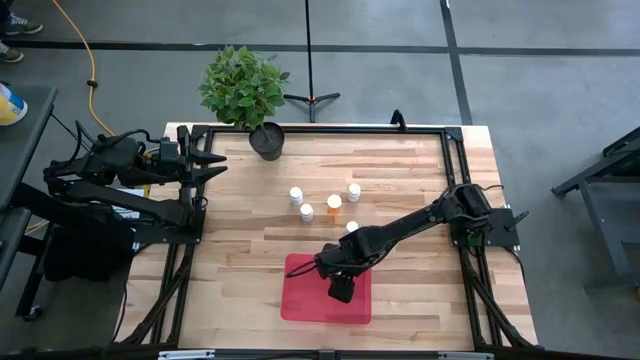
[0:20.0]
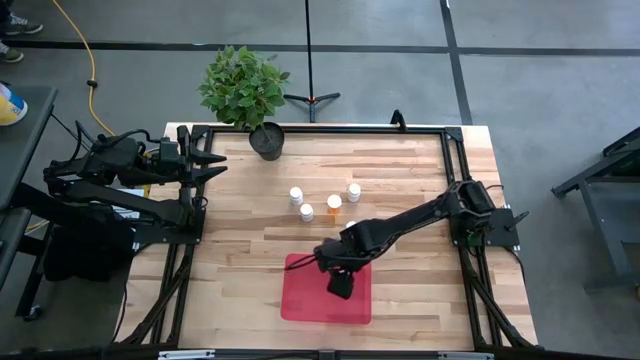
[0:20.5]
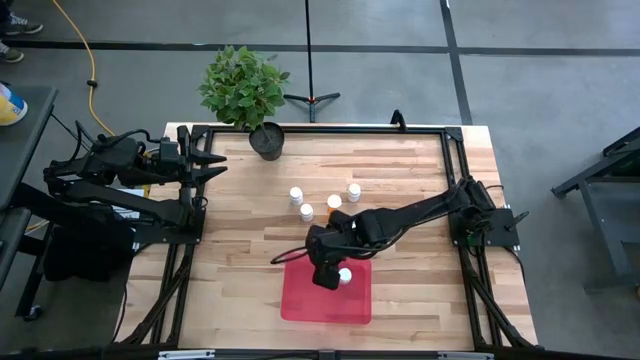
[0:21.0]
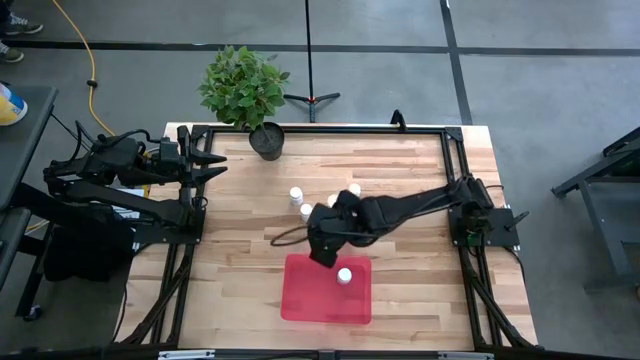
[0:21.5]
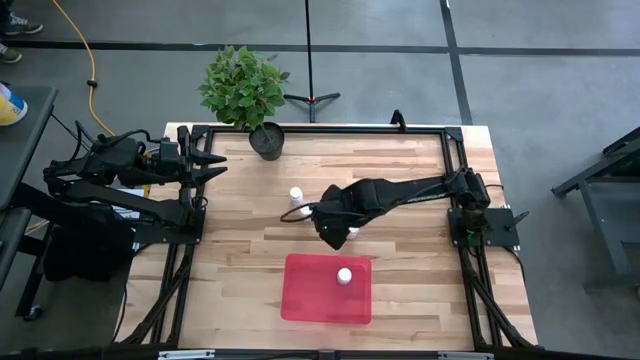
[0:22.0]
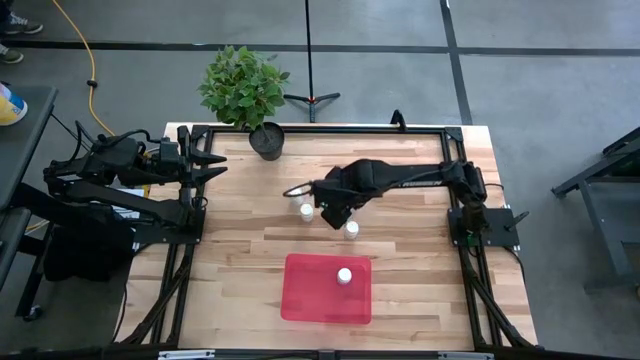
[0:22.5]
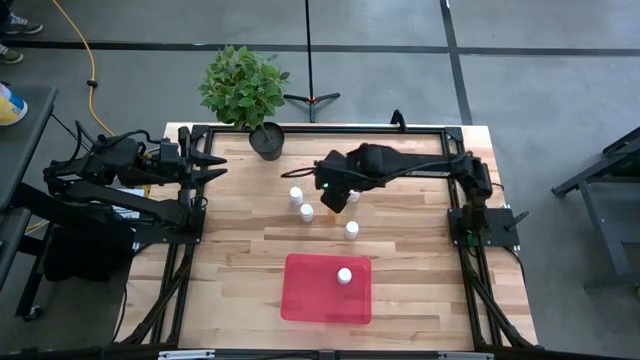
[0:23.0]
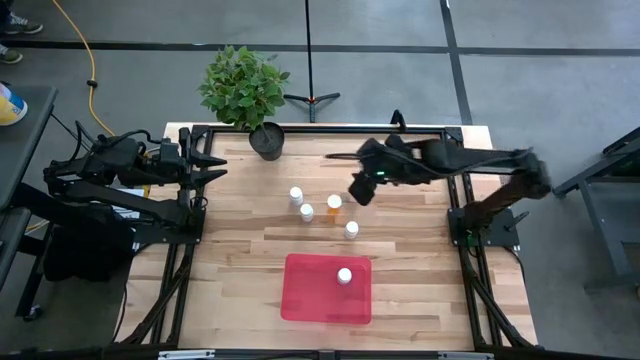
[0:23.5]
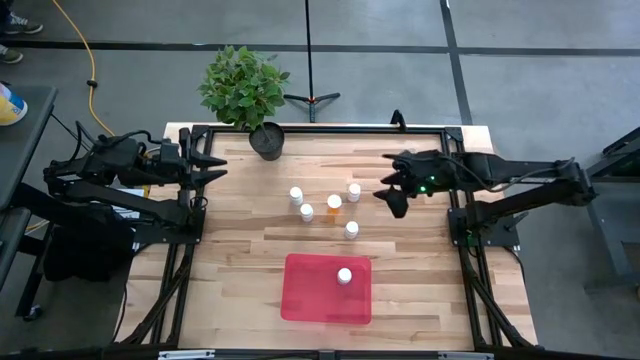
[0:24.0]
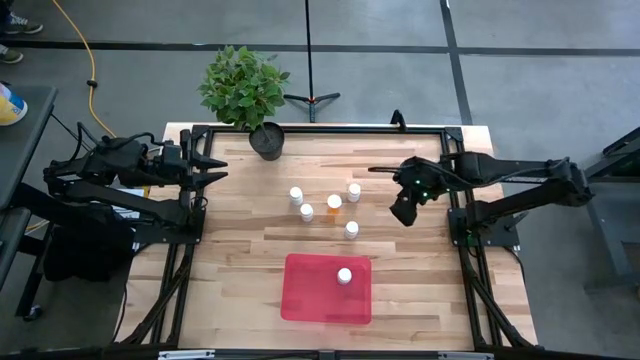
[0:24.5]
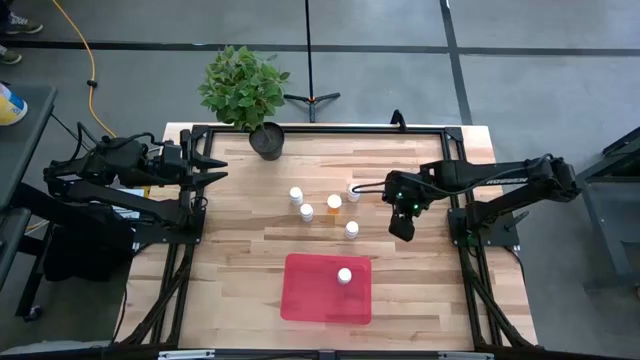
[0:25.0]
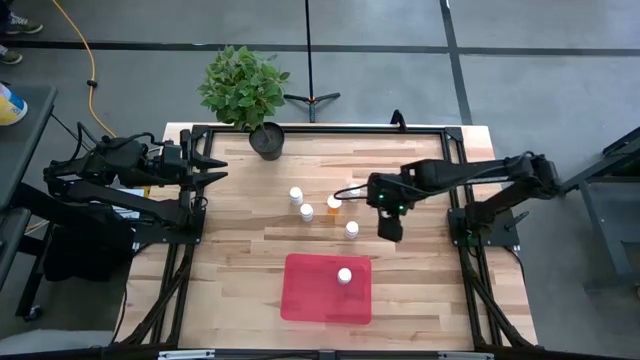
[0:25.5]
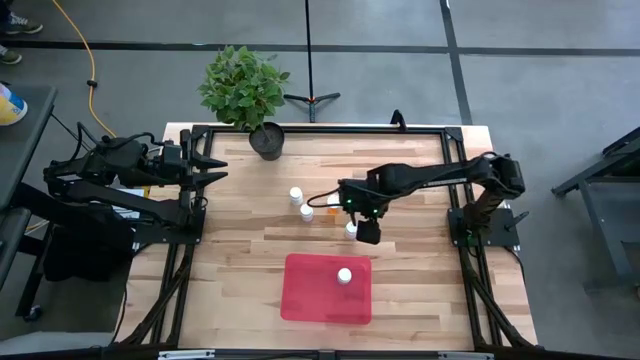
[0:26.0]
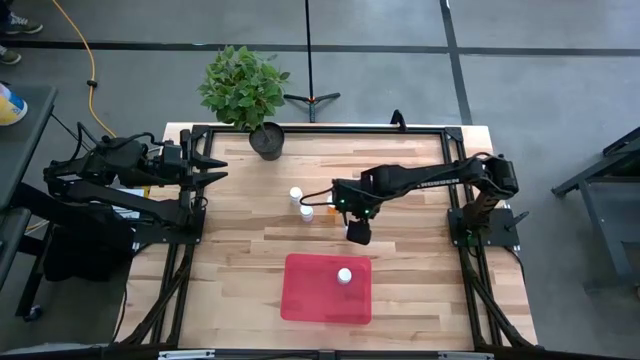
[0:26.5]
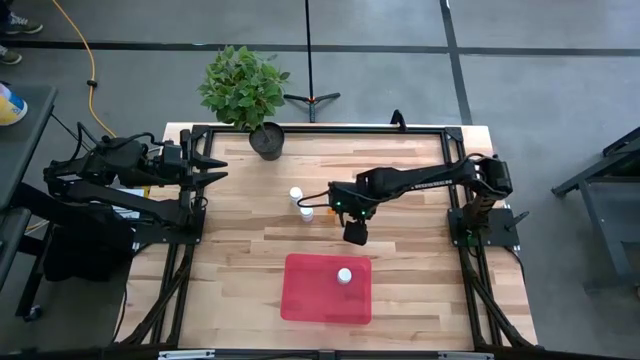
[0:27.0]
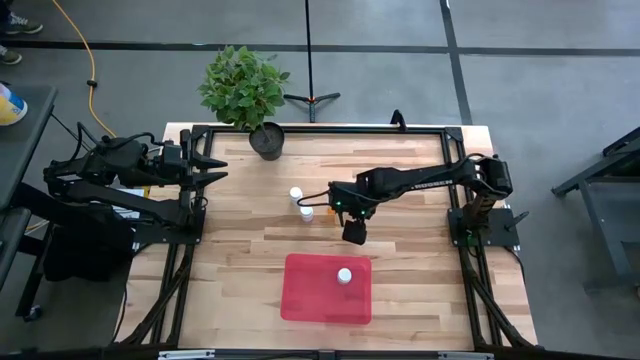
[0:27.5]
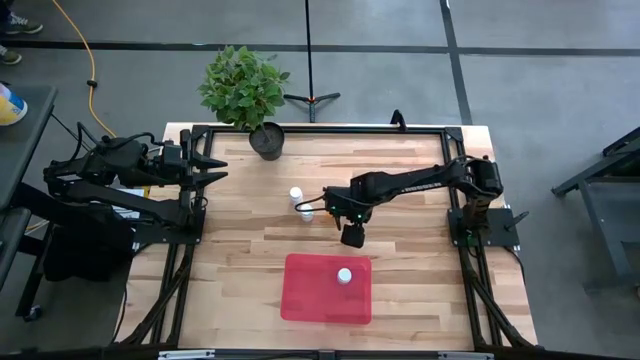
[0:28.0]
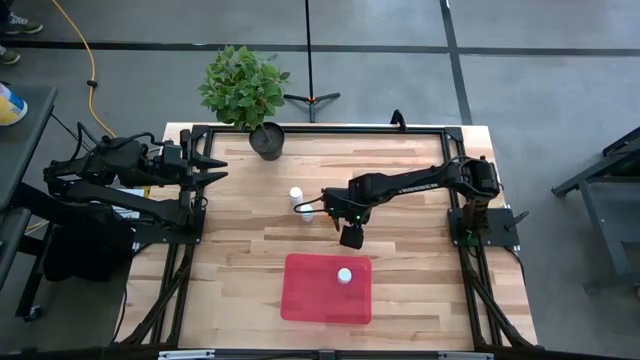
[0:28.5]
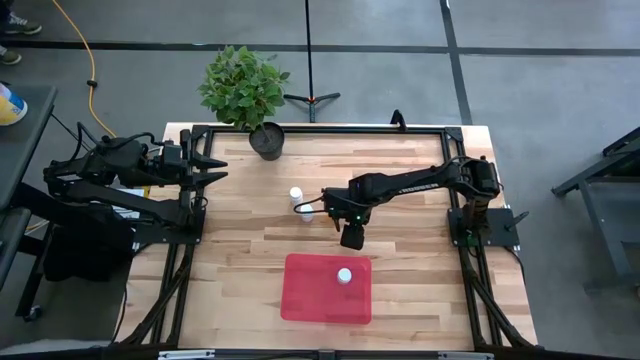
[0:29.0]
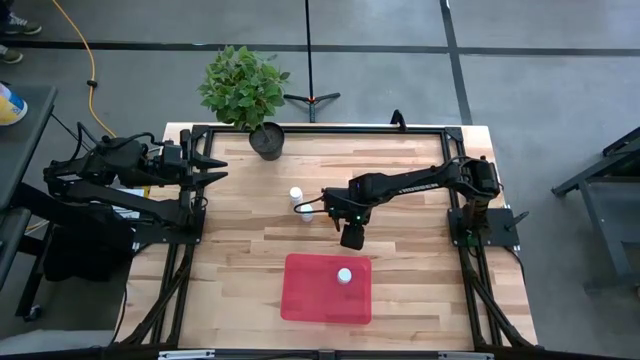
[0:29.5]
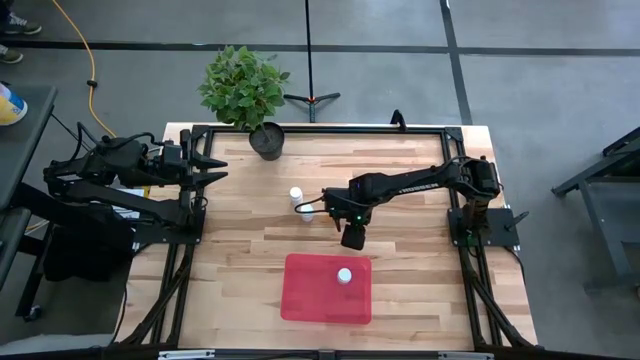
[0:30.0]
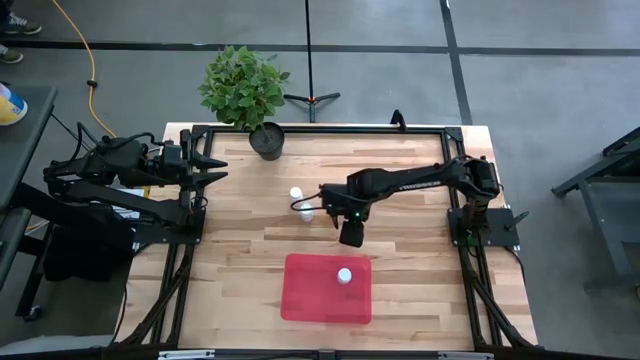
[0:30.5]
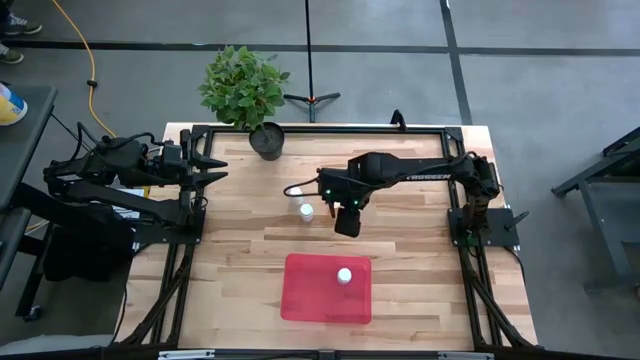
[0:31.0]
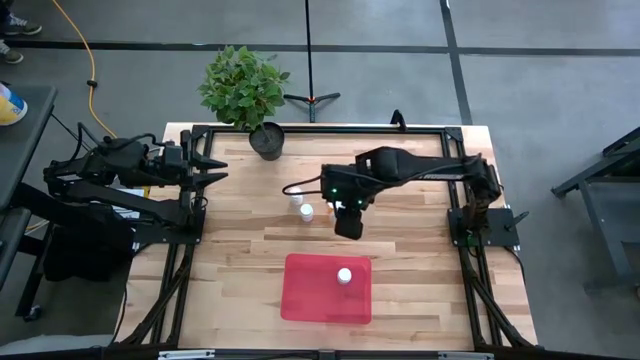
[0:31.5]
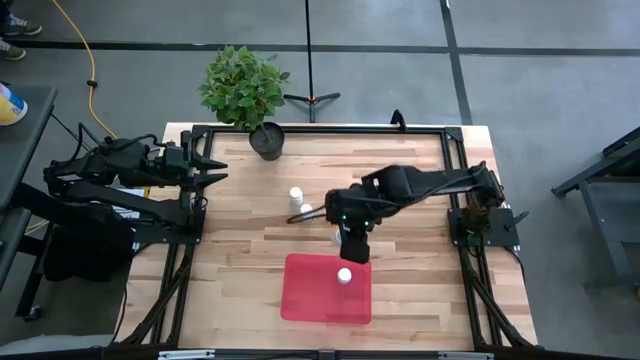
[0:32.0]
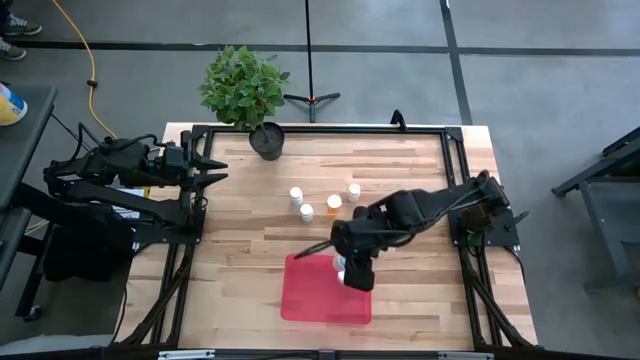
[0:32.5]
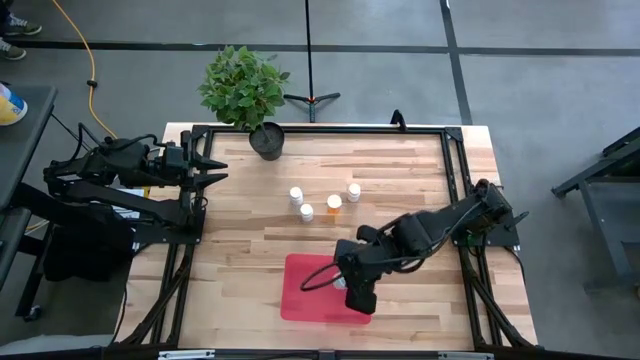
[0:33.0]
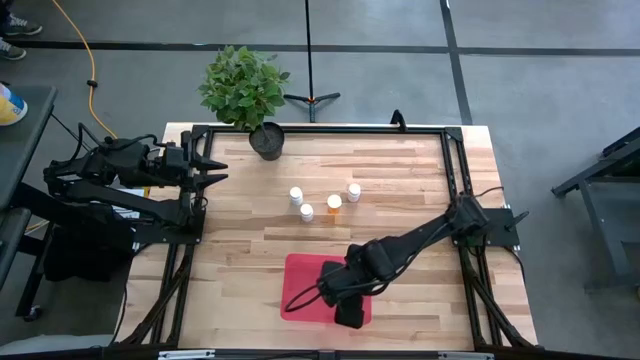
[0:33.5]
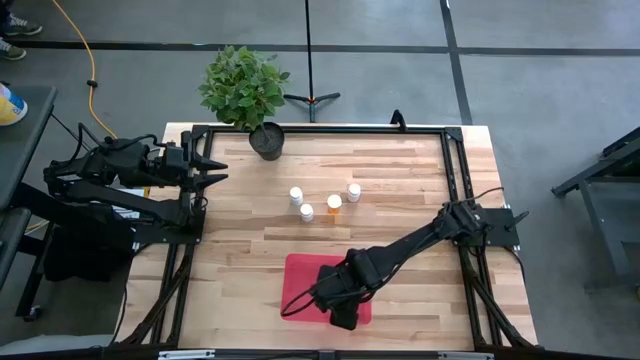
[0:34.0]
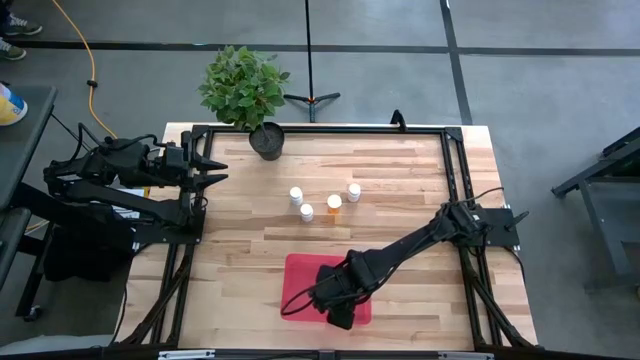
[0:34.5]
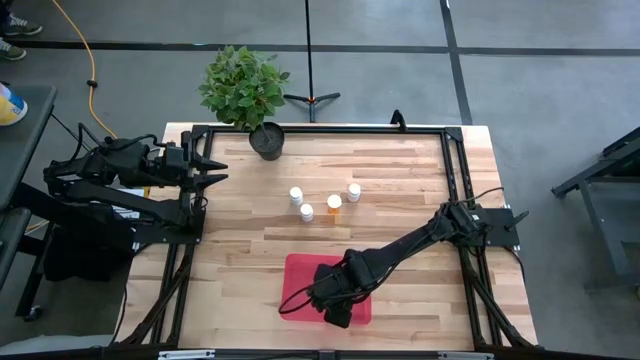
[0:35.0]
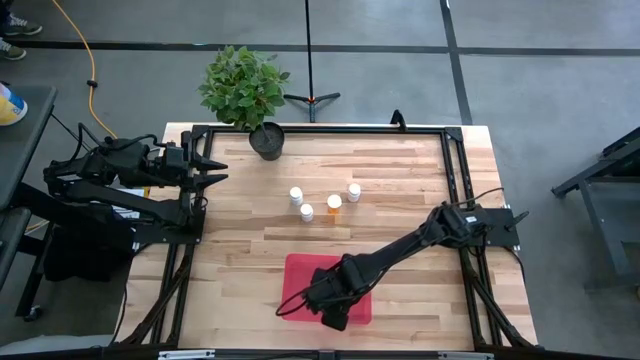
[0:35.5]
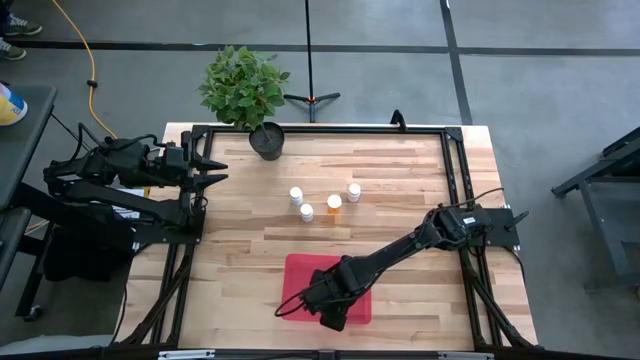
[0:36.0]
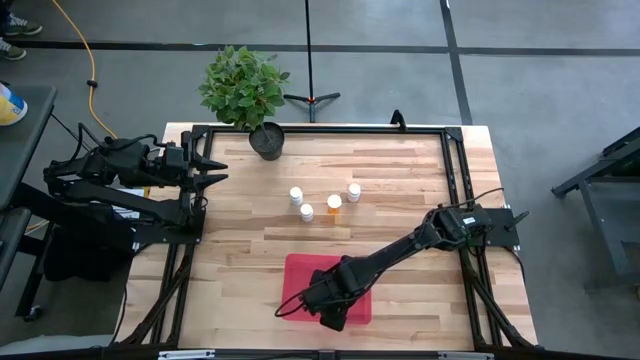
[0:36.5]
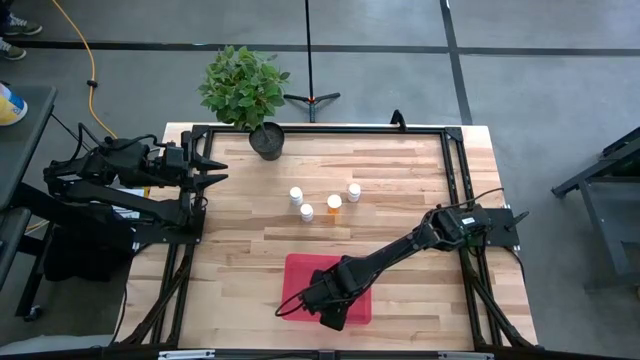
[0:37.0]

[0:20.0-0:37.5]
Task: Pick and place pill bottles into a basket
Put the white pill bottle into the red bin

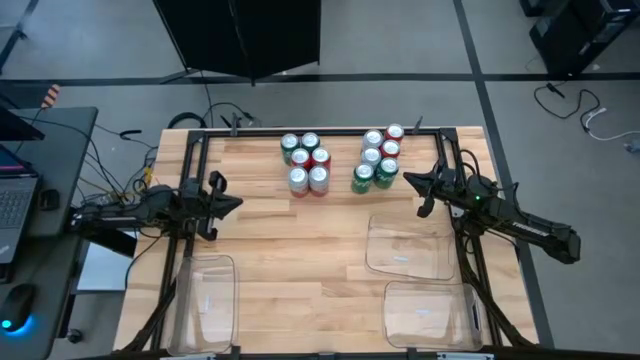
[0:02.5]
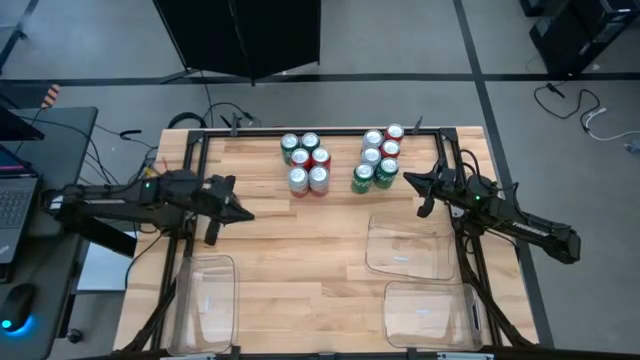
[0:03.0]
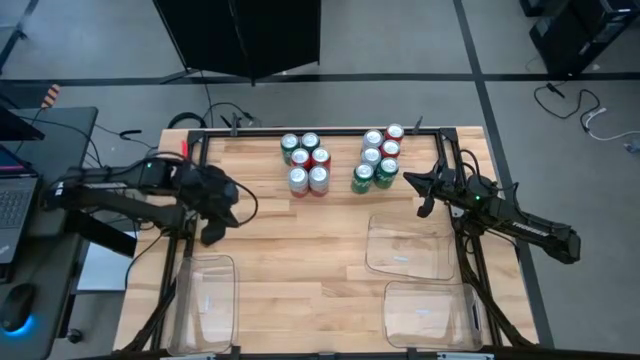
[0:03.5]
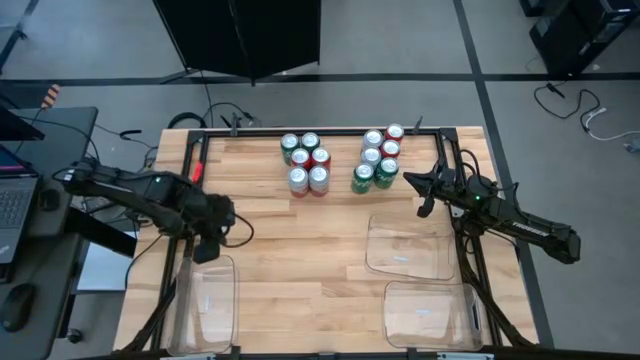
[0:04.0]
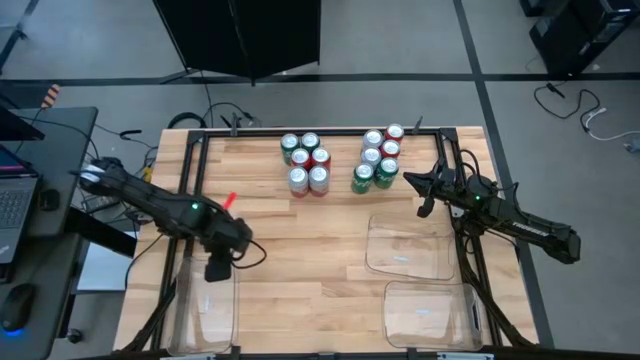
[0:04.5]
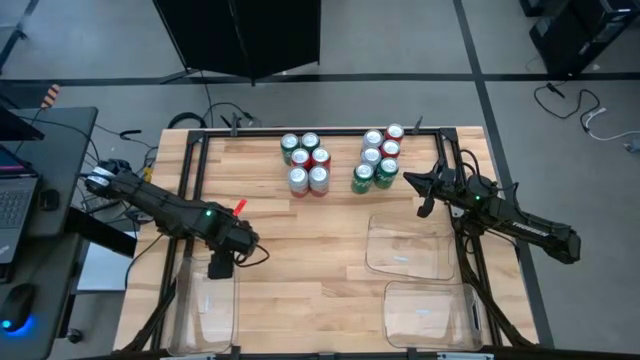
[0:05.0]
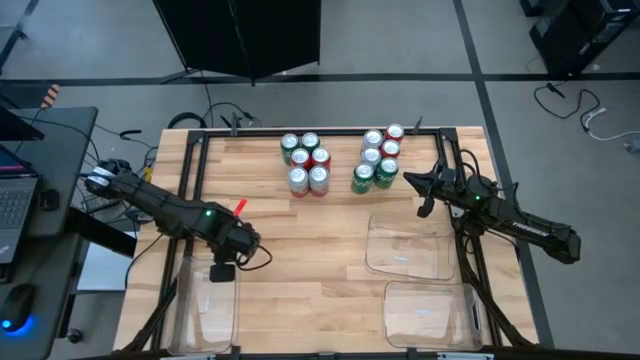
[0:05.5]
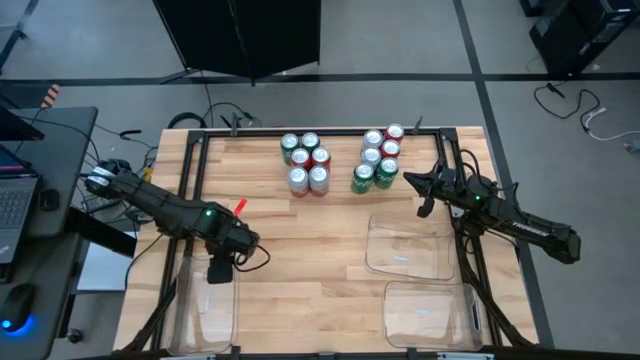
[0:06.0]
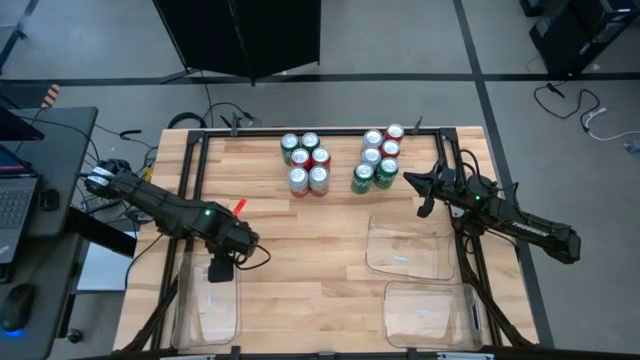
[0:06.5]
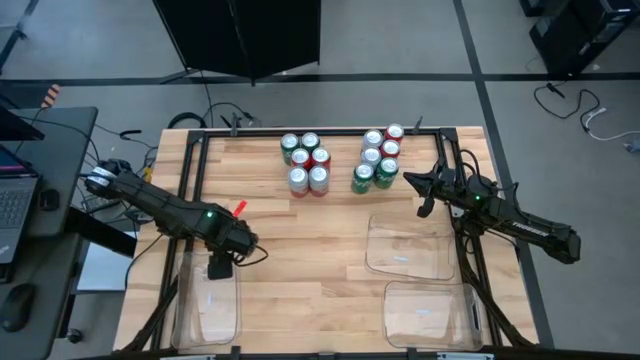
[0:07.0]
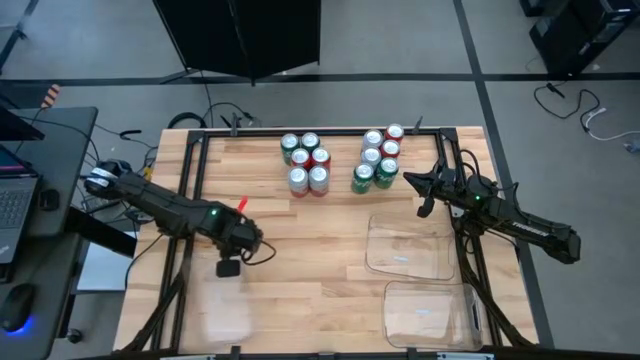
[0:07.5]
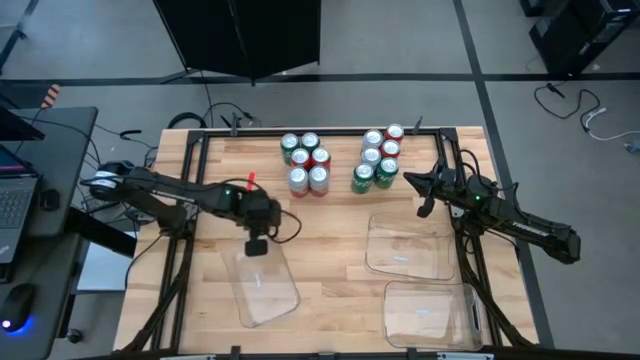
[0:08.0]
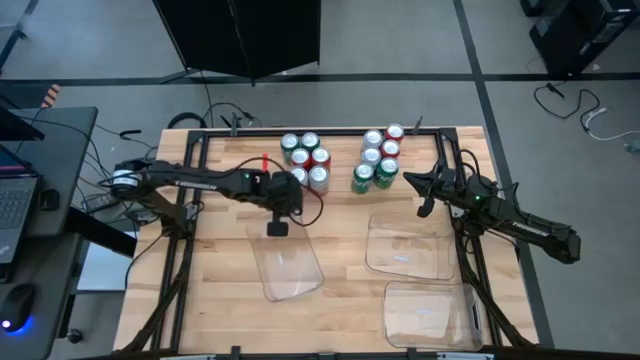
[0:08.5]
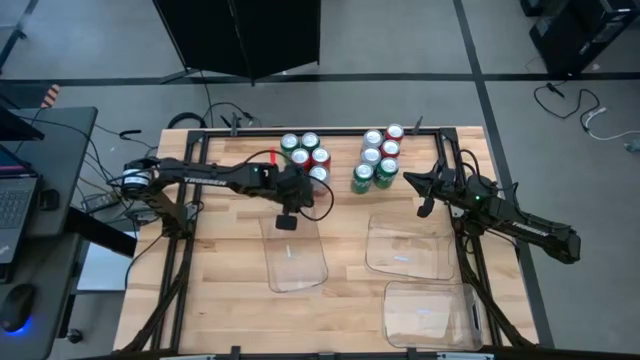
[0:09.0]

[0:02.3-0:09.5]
Task: Sort soda cans
Move the bottom left transparent bin to the center of the table
